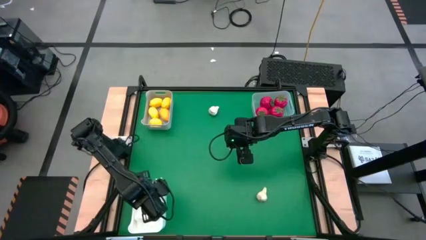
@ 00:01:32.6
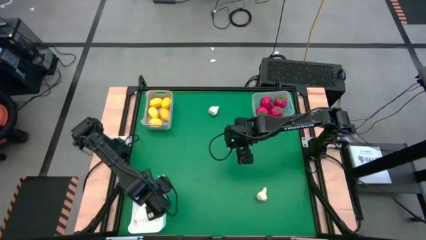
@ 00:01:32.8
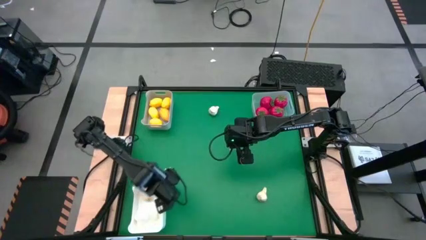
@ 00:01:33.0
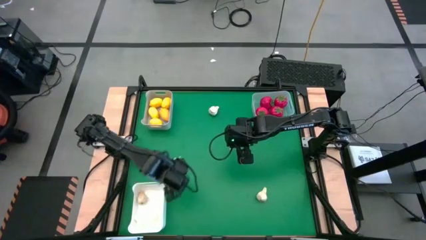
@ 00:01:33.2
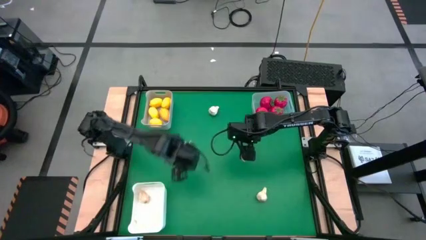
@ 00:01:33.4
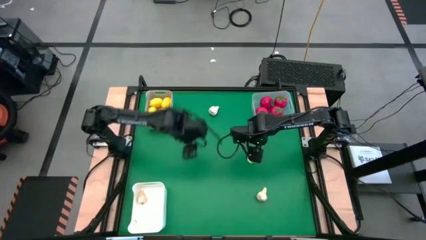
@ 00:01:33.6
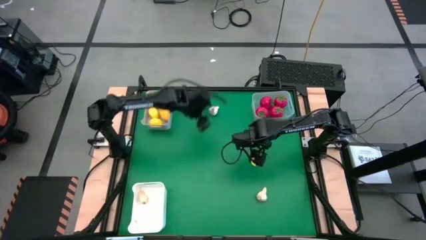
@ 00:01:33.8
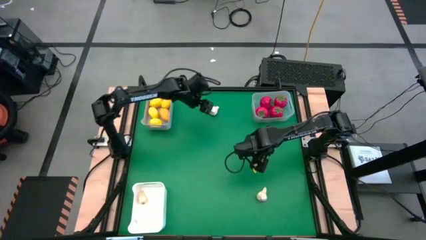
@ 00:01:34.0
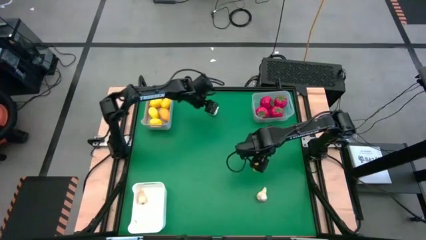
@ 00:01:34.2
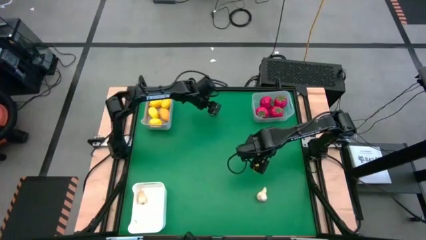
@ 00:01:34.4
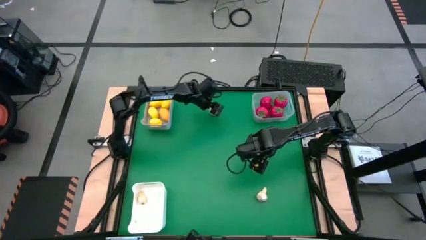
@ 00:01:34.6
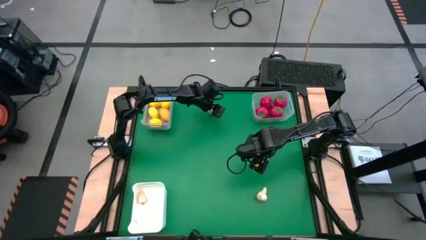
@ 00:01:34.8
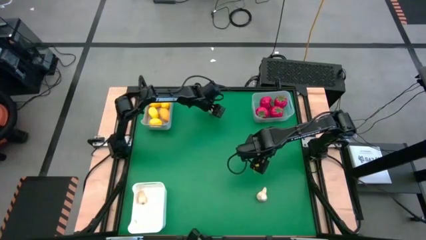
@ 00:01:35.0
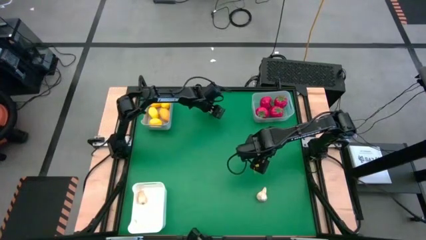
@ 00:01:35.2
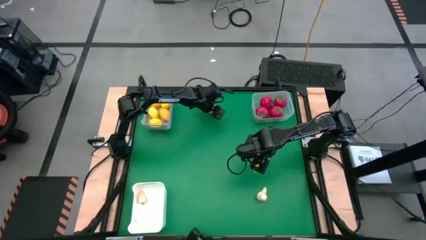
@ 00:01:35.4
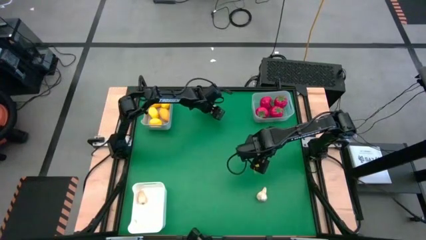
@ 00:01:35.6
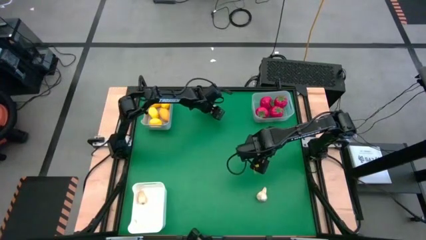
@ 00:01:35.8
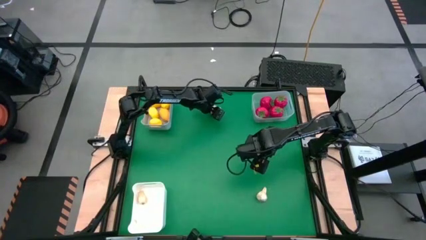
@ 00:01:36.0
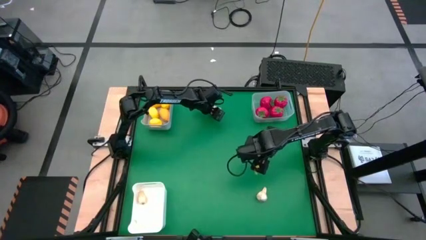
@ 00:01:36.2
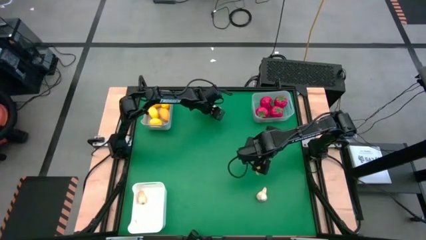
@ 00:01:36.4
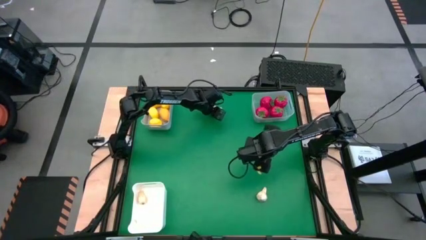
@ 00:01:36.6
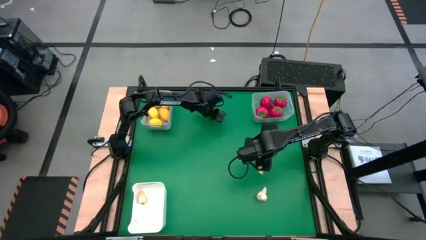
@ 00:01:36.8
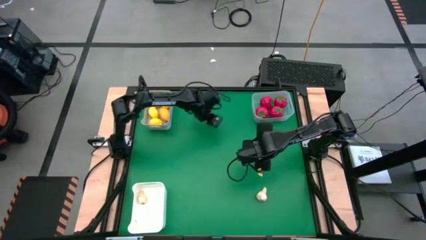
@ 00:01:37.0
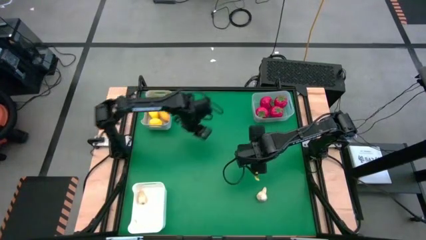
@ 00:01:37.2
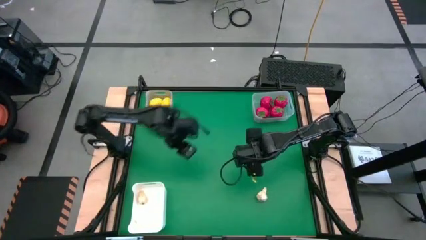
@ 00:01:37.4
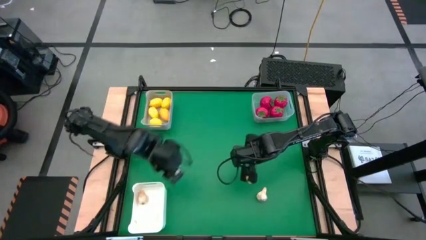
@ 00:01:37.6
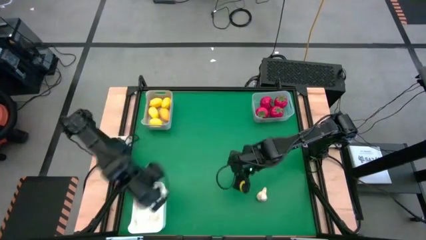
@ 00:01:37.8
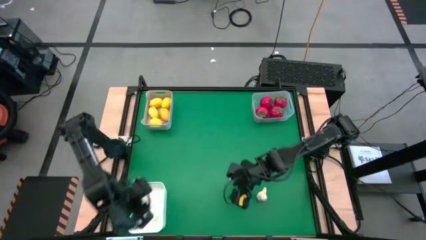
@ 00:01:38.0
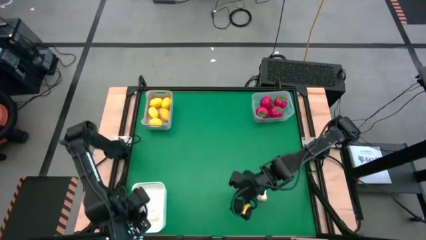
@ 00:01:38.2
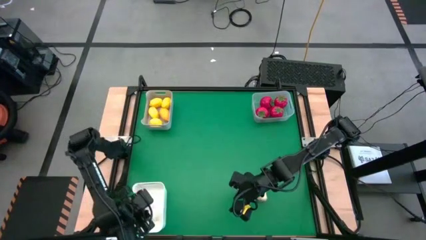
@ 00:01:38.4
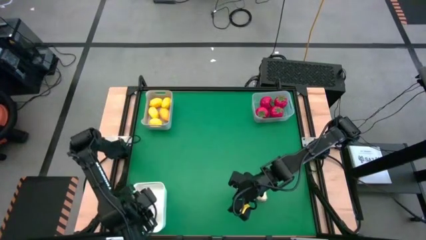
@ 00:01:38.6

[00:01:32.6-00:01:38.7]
Task: Sort produce into baskets
Put the garlic into the white bin

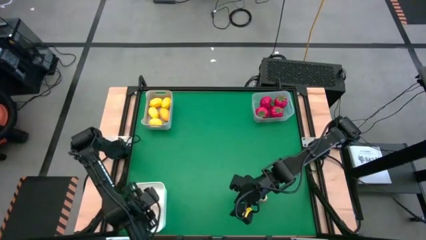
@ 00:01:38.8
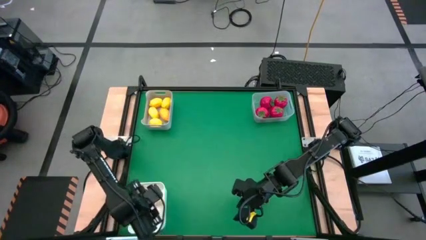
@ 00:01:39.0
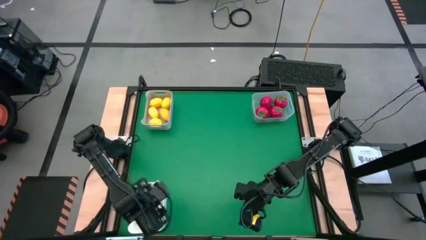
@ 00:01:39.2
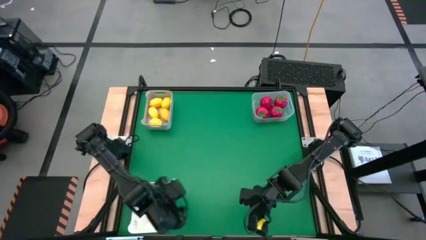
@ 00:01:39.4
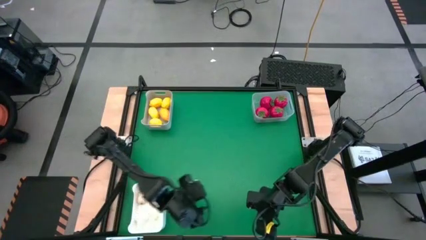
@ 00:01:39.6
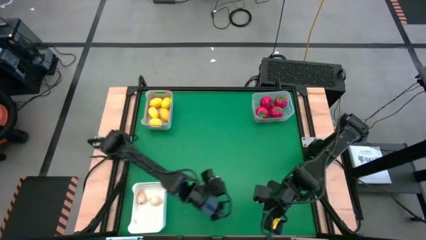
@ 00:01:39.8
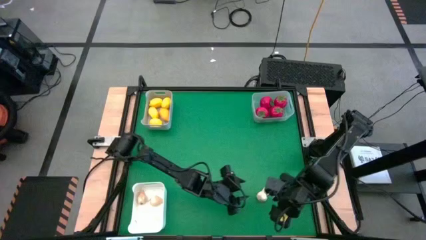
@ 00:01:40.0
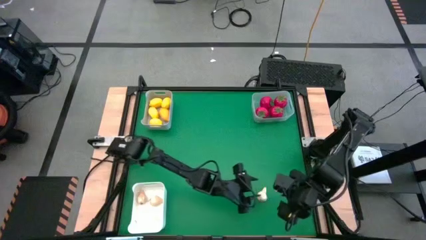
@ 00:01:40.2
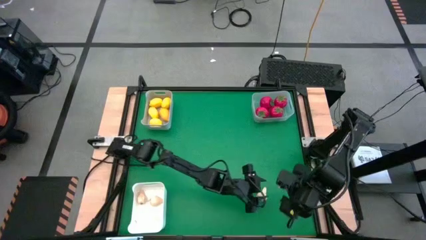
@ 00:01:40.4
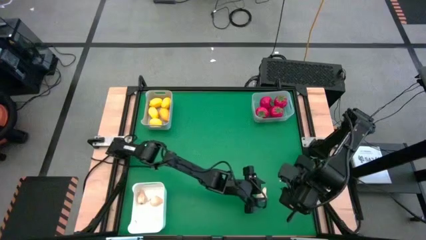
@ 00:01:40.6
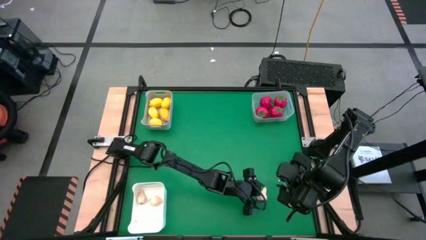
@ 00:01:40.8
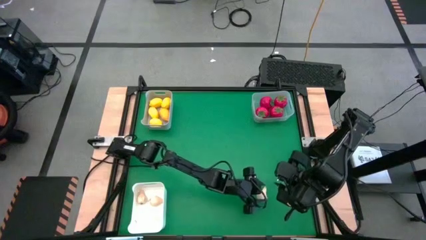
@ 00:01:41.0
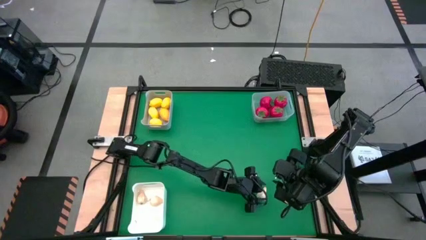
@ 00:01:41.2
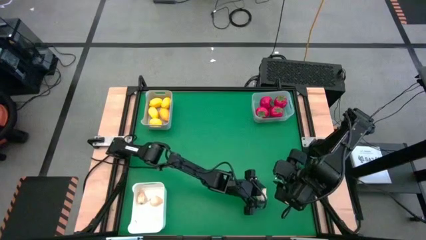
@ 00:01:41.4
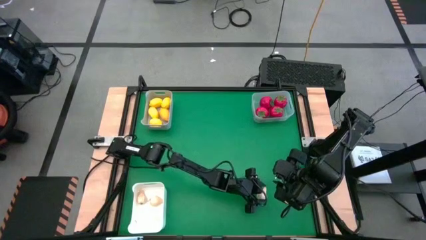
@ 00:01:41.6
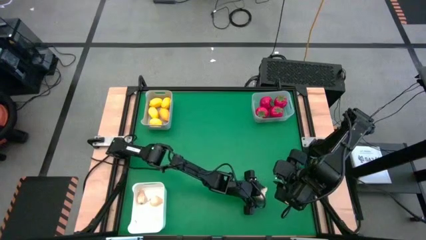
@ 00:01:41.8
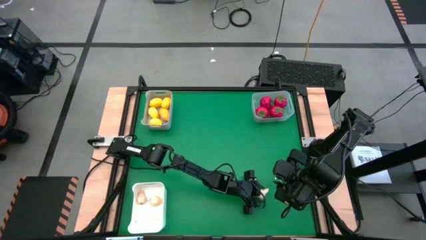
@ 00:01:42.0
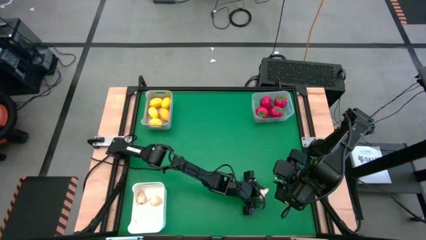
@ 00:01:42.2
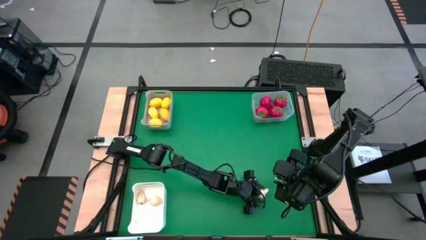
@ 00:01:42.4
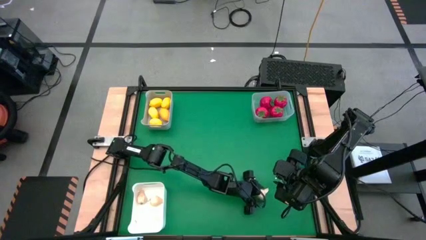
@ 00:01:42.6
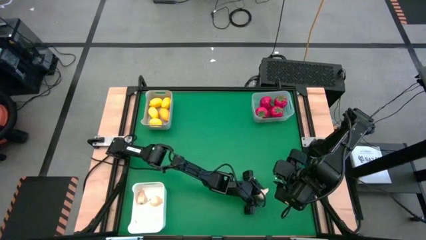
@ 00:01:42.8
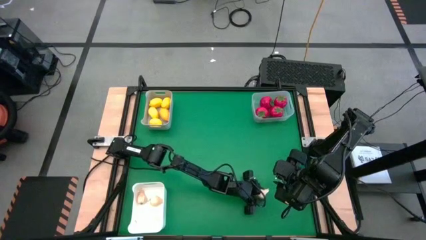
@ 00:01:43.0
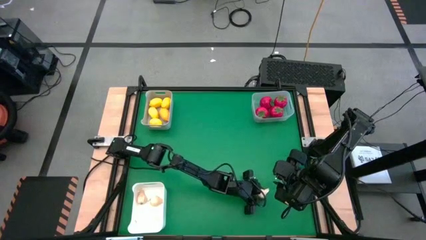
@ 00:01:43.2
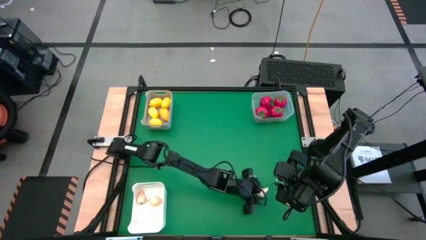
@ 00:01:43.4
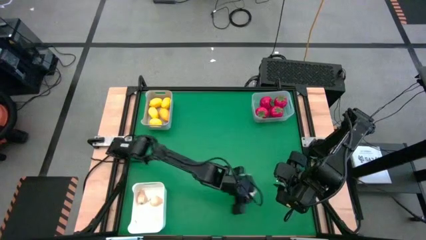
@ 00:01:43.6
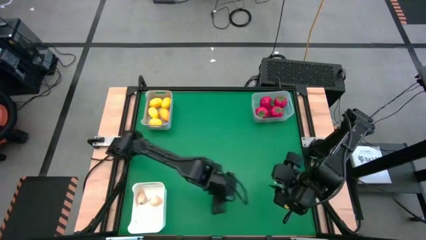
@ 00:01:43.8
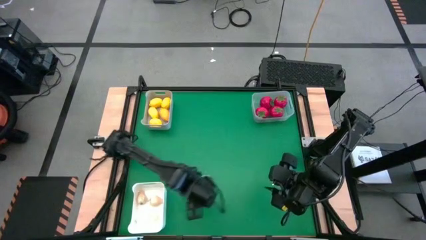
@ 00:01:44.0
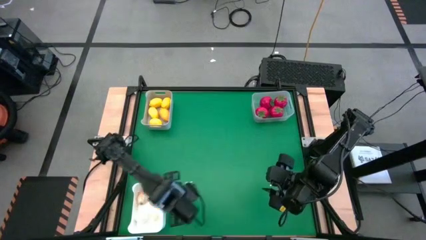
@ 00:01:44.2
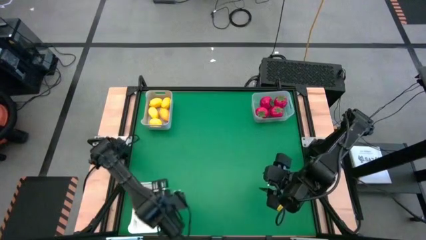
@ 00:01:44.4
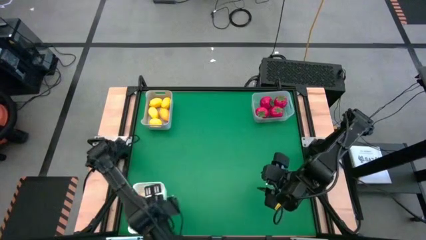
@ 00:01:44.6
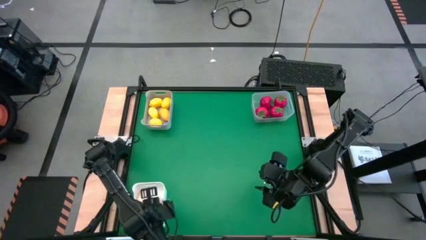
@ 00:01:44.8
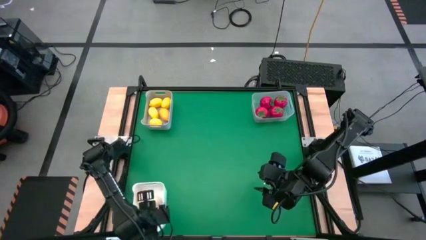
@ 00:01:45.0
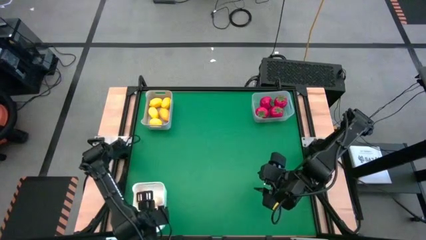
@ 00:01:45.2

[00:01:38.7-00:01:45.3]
Put the garlic into the white bin

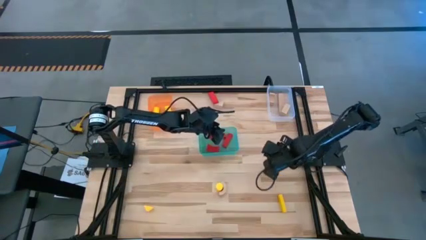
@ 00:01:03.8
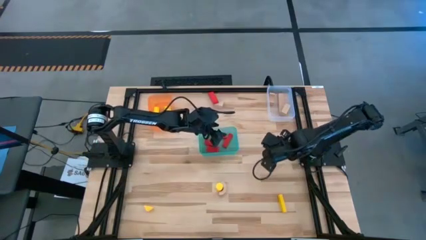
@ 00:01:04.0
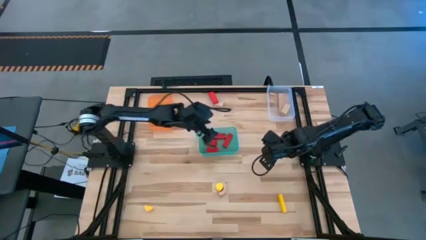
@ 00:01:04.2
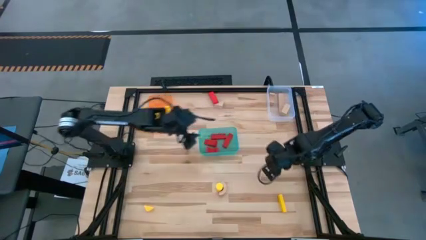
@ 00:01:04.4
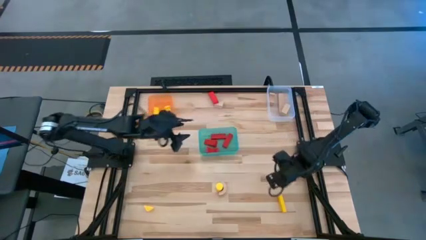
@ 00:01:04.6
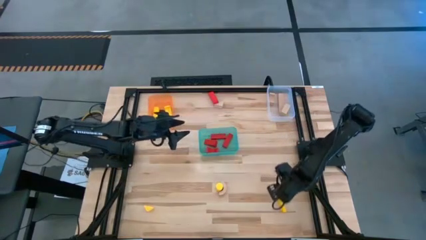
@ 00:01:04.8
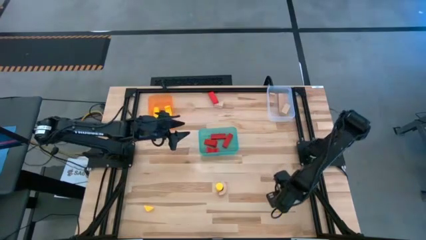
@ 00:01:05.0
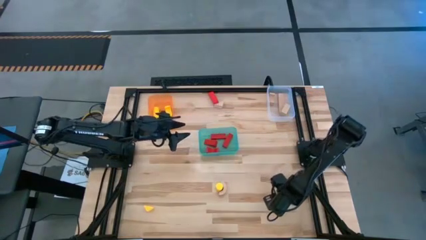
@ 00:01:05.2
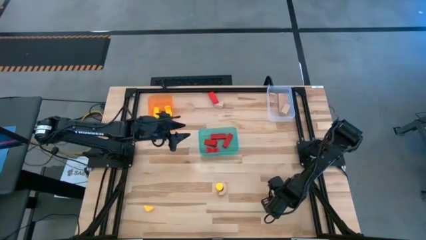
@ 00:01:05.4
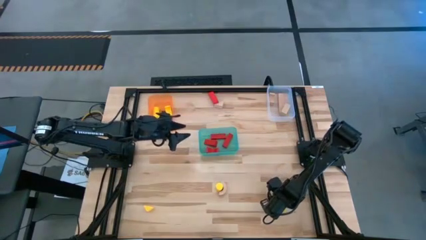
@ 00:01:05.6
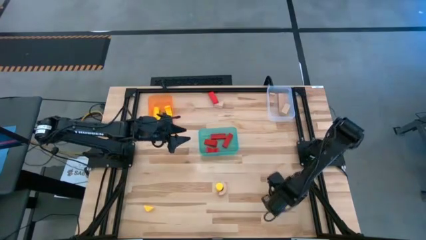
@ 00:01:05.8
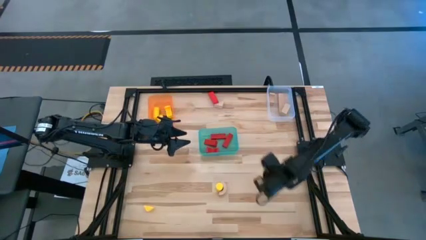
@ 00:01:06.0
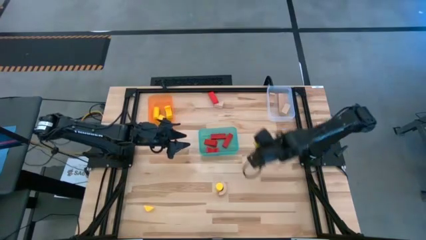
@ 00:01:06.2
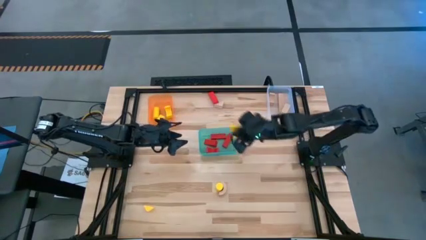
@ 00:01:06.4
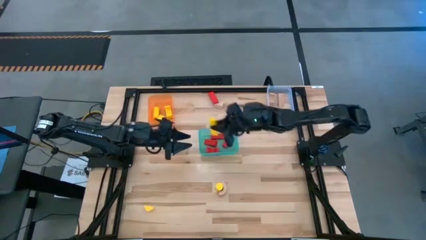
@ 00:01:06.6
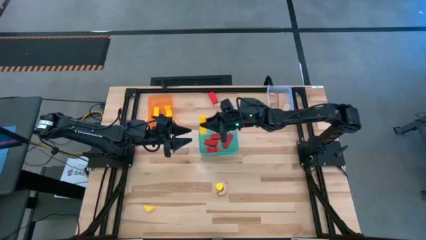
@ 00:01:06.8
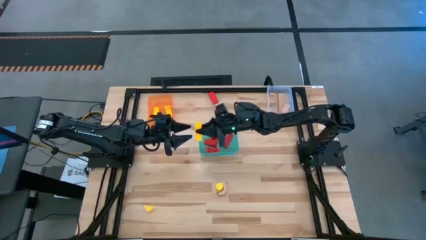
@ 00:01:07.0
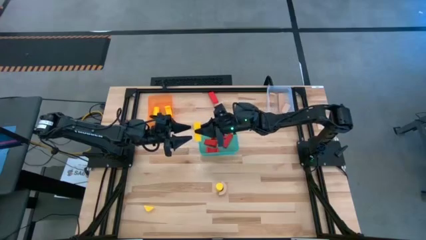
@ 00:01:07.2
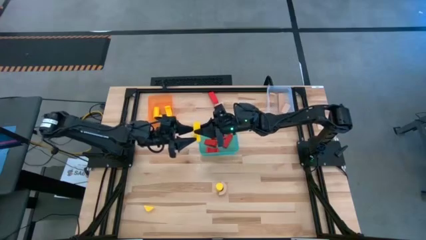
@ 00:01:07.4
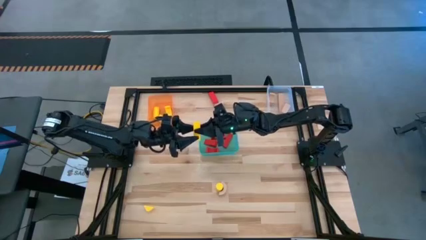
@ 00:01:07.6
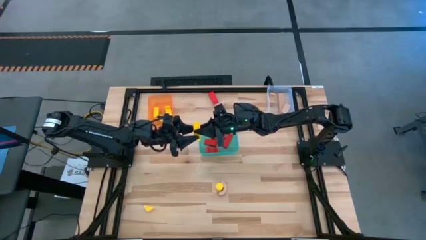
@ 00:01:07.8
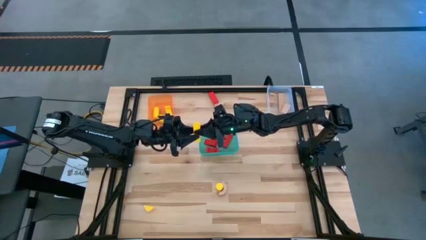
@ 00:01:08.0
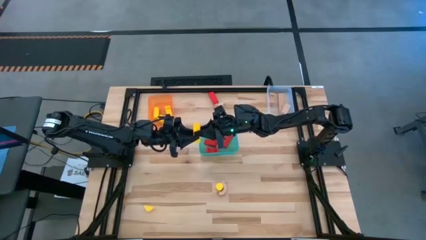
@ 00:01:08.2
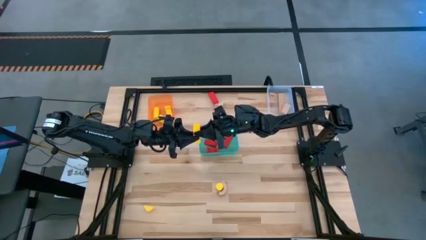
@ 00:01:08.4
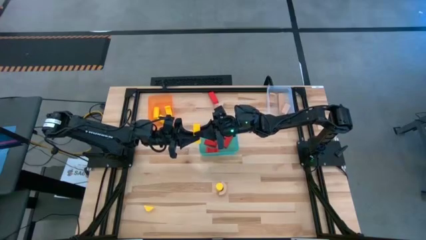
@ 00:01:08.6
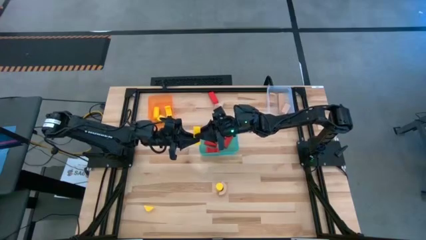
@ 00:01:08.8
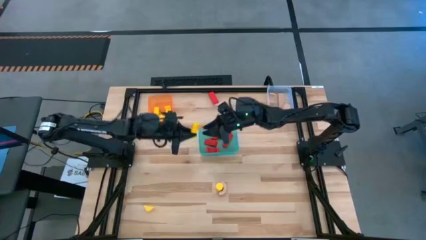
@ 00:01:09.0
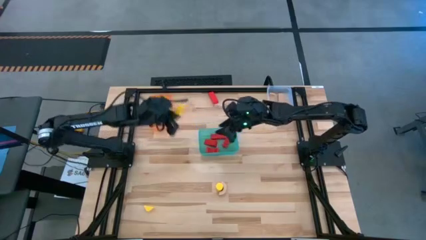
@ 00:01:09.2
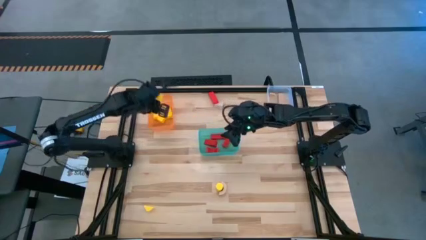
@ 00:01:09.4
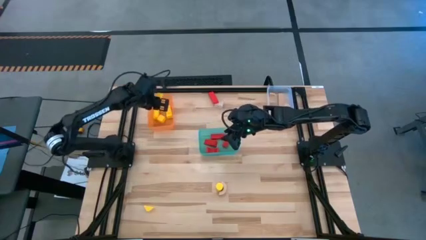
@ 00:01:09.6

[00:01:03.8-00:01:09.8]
Task: Sort & place blocks by color
Put the yellow block into the orange bin
